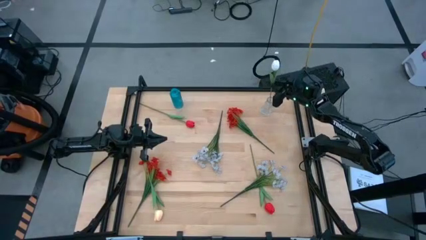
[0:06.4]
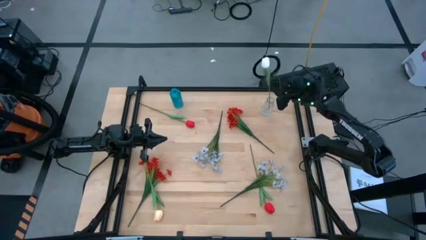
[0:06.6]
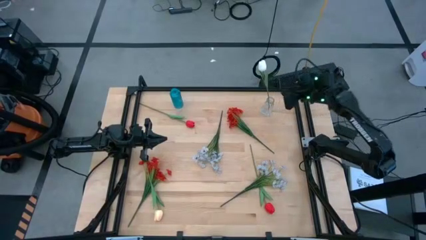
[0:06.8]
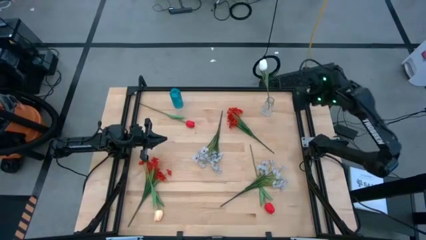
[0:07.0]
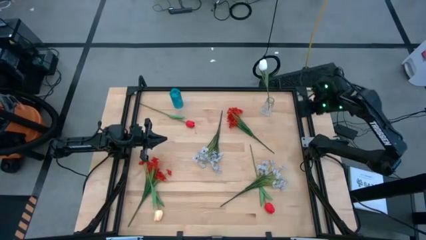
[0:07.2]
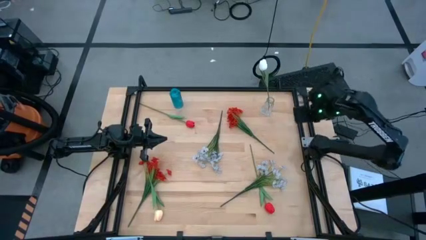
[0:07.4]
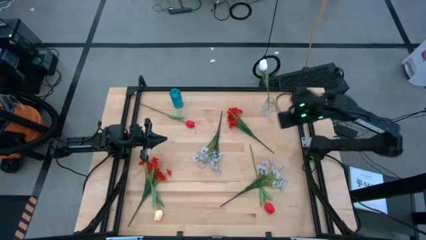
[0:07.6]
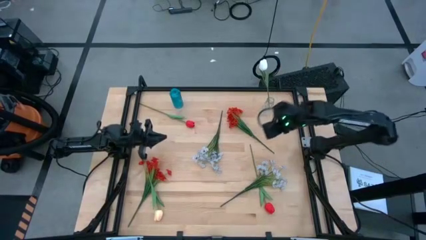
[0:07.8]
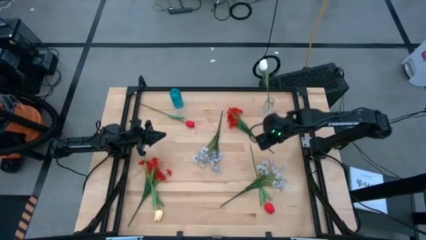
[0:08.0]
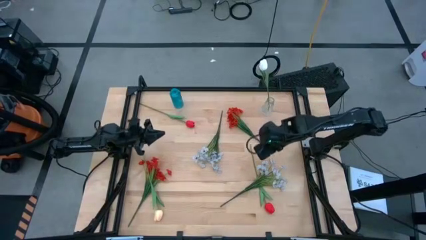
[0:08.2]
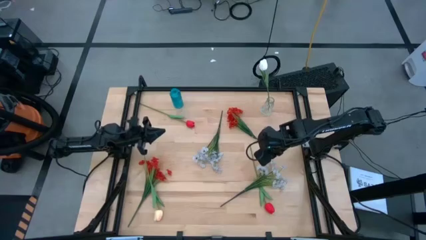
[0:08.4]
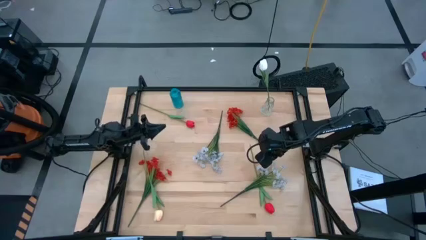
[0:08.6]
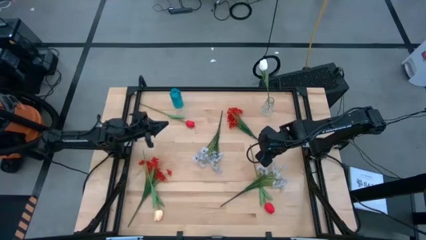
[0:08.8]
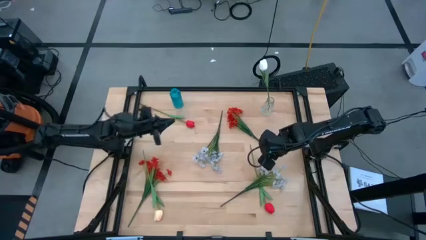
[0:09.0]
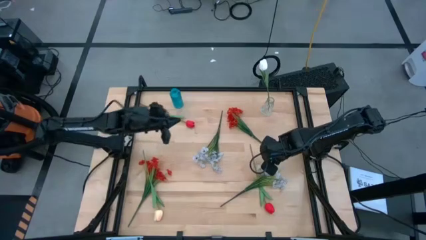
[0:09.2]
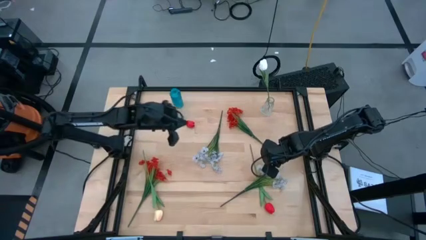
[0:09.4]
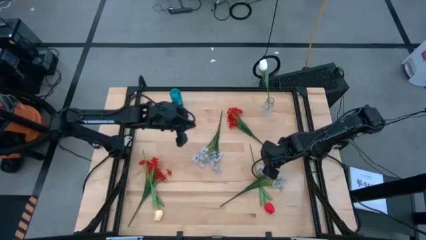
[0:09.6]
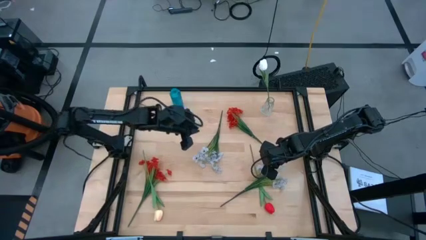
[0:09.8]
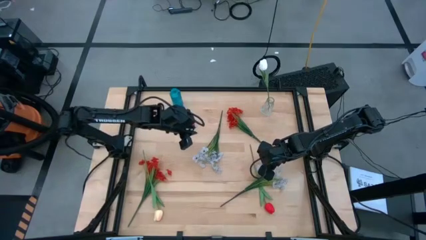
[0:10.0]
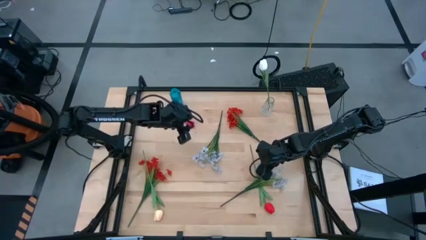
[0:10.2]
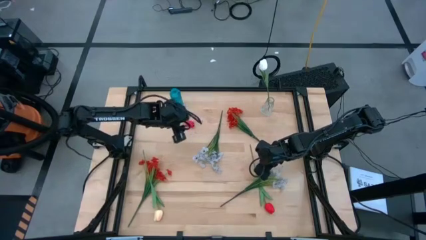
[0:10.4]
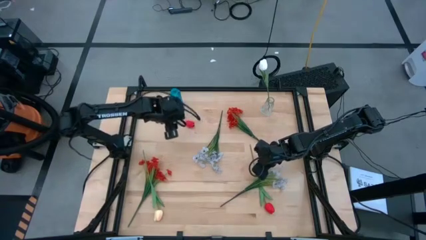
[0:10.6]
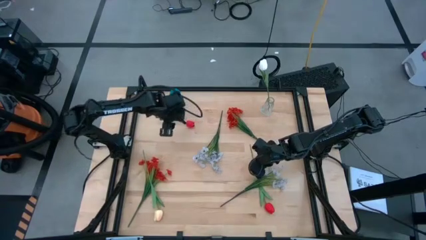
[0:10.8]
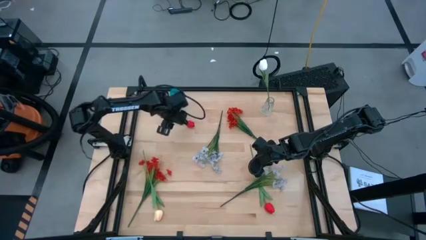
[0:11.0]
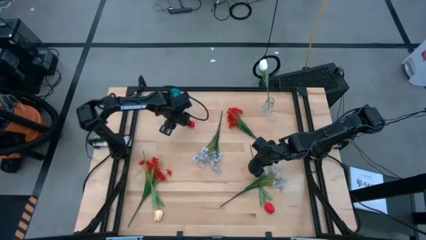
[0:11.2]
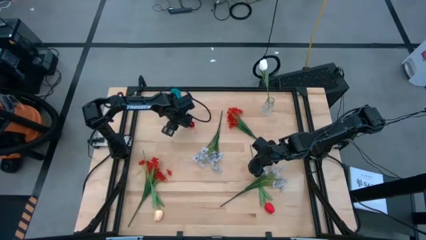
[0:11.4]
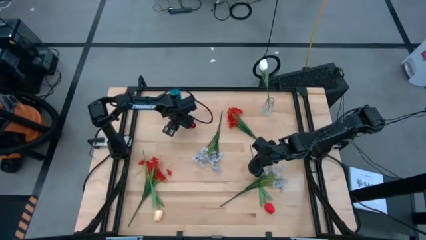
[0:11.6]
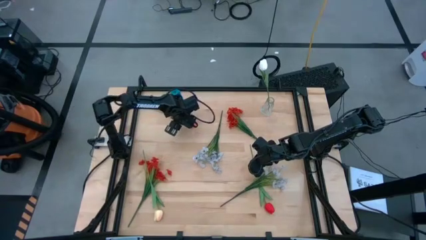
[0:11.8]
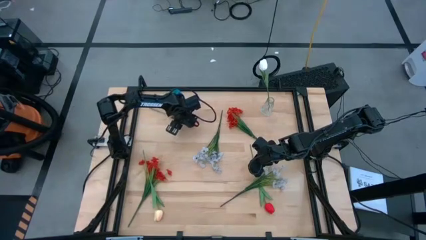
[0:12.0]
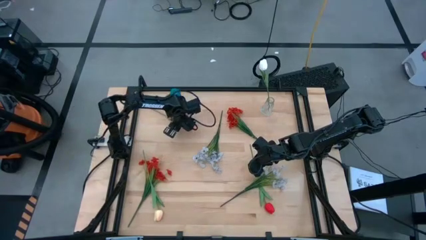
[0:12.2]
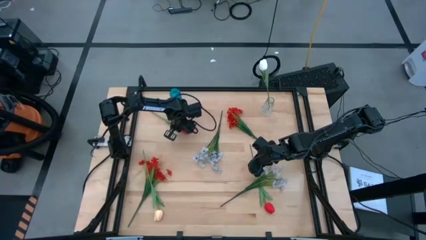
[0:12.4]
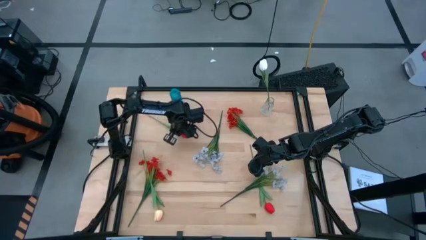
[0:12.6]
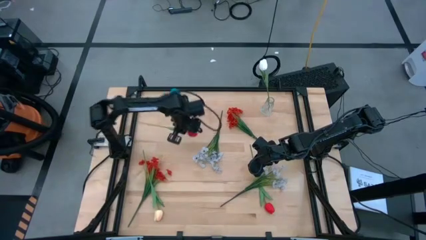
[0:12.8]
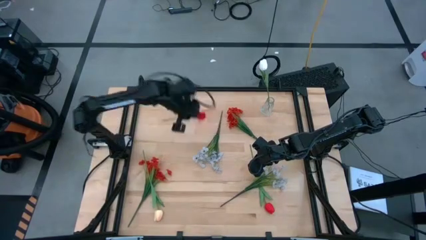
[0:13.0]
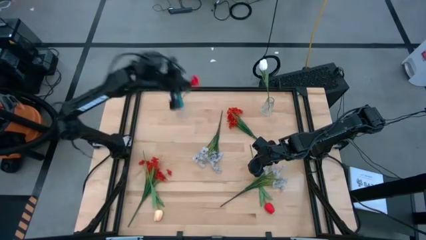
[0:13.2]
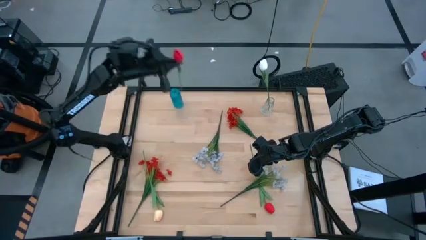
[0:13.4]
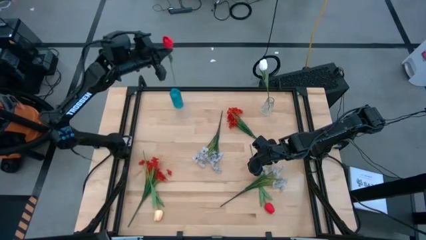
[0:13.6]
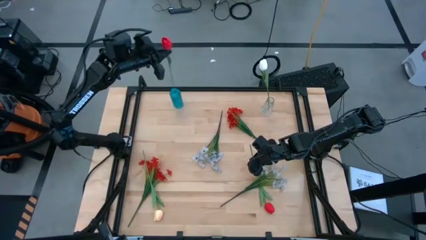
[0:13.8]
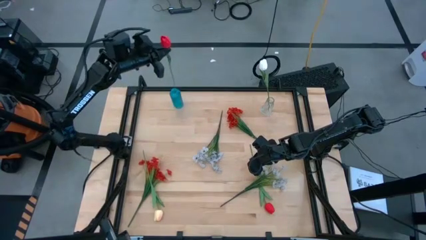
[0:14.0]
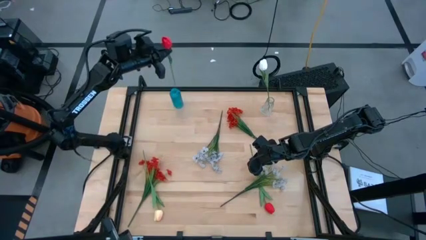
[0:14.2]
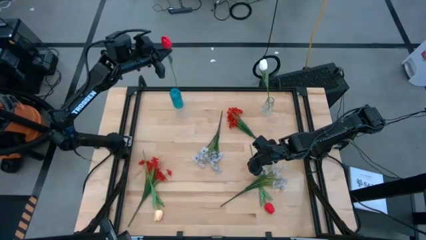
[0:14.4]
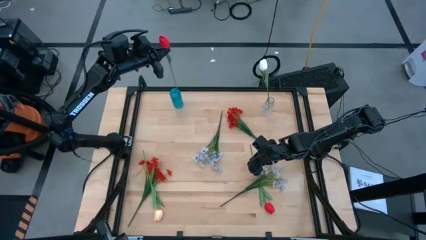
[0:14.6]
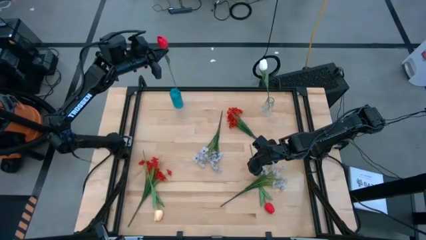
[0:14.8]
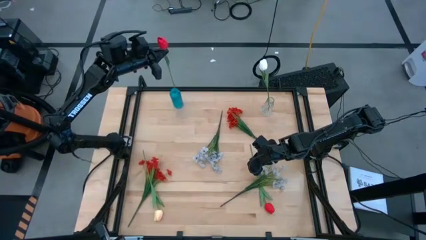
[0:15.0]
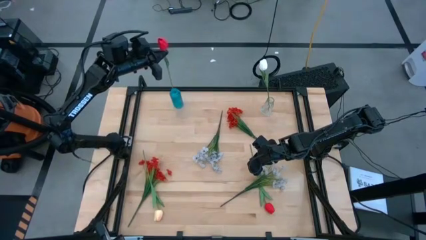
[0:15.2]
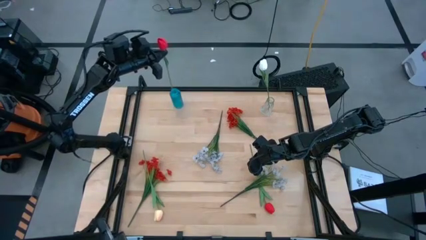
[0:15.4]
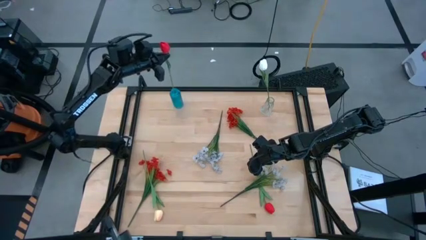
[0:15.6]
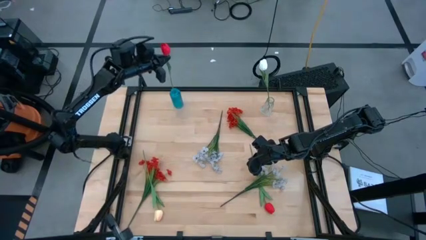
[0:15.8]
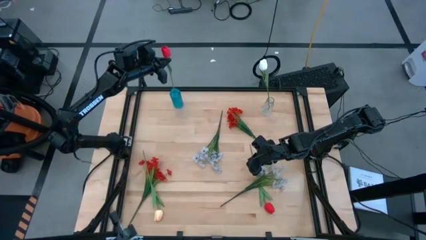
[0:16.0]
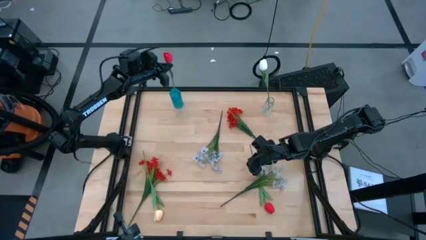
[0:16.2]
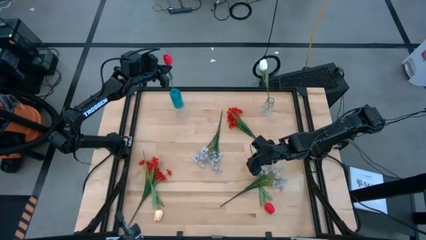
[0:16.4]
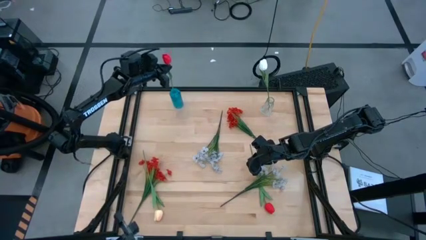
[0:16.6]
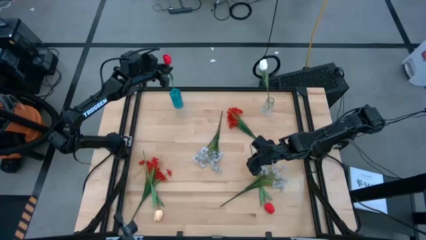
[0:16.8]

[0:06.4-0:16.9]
Task: Sort flowers into vase by color
Put the top red flower into the blue vase
